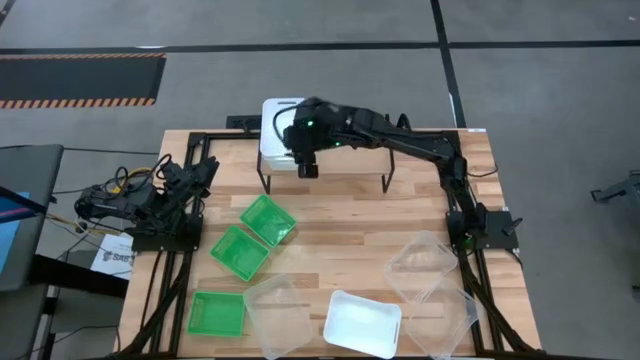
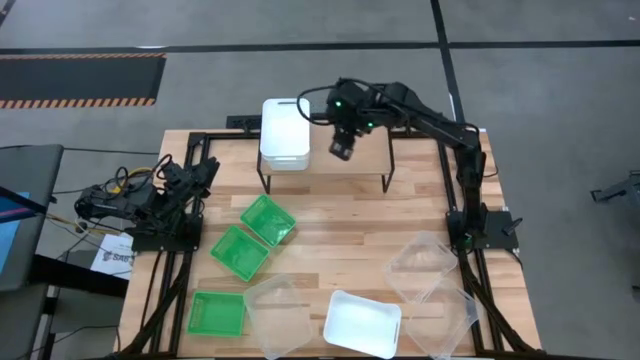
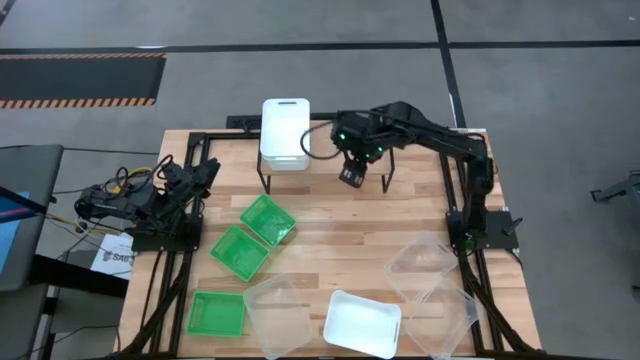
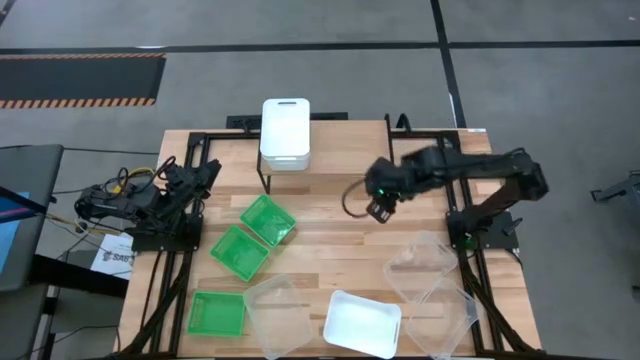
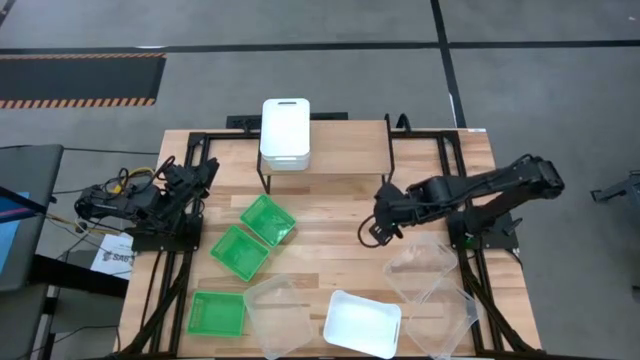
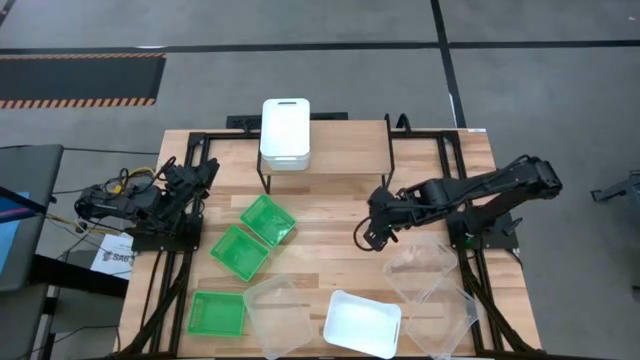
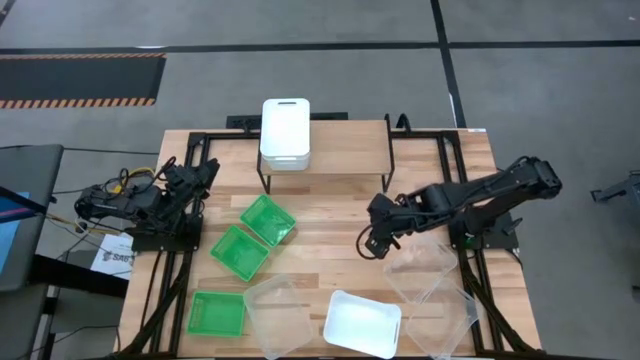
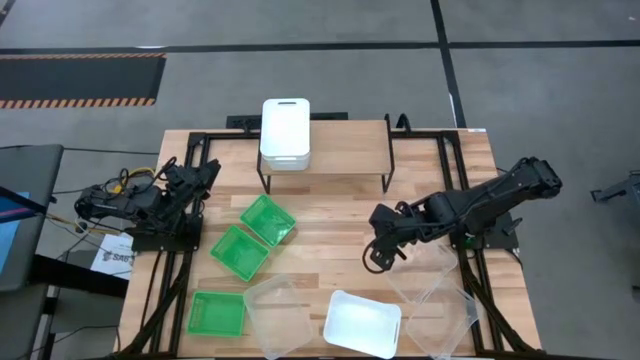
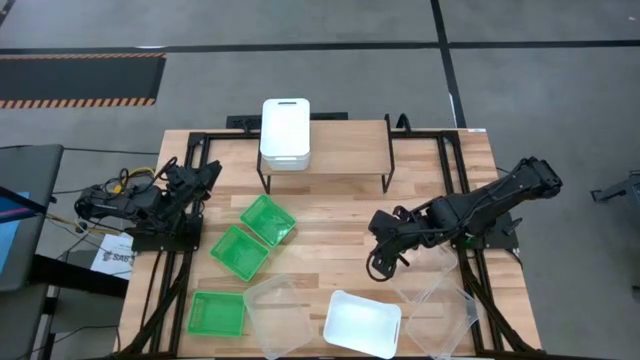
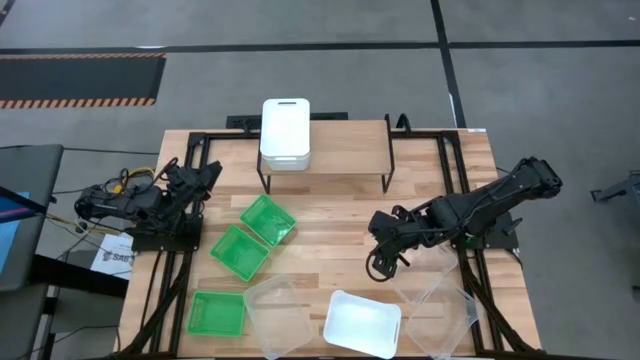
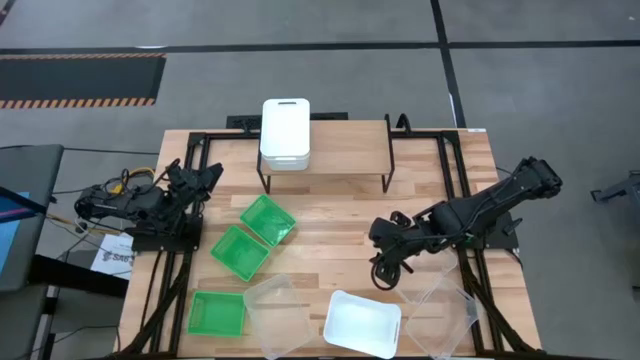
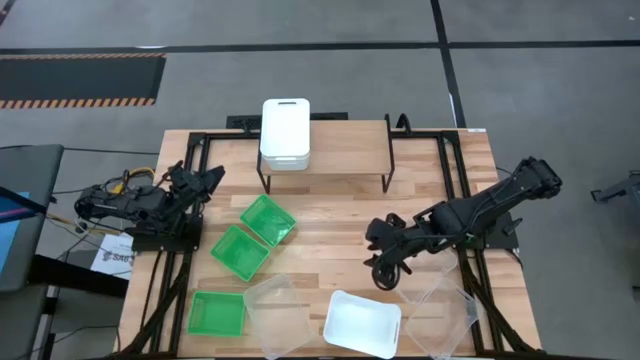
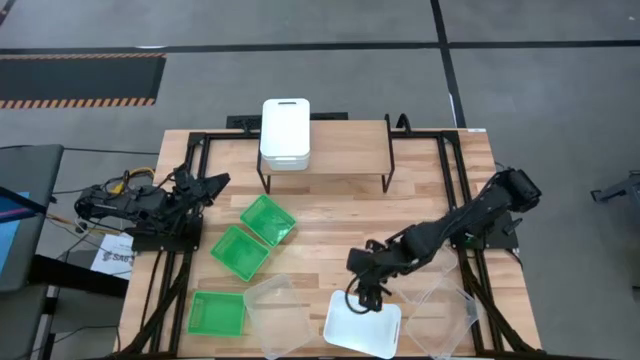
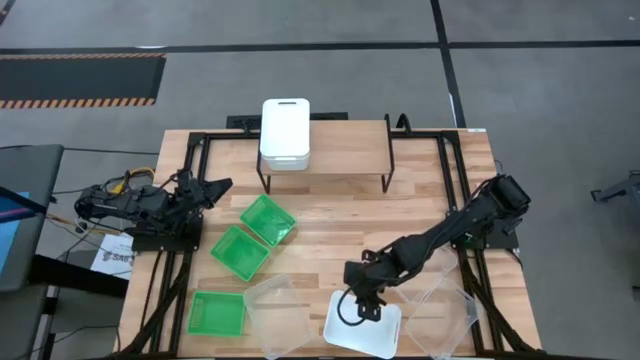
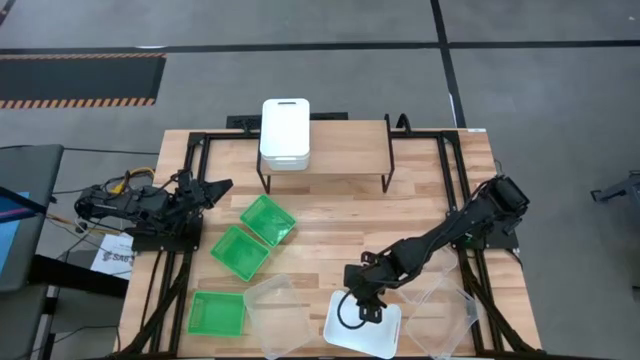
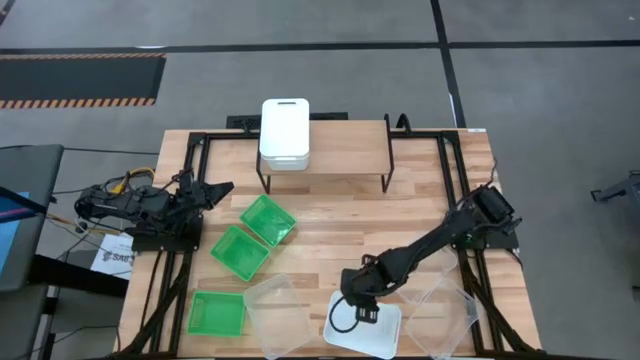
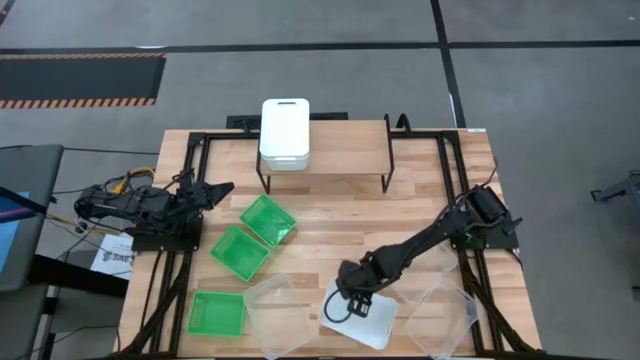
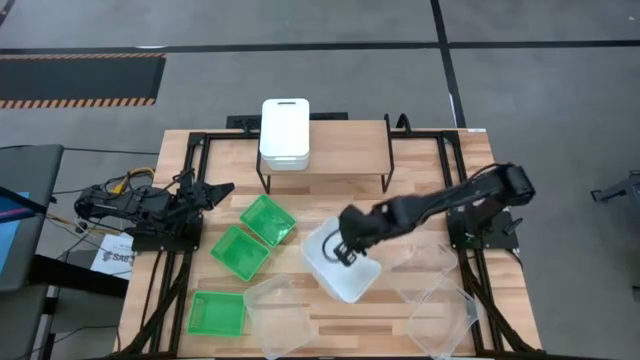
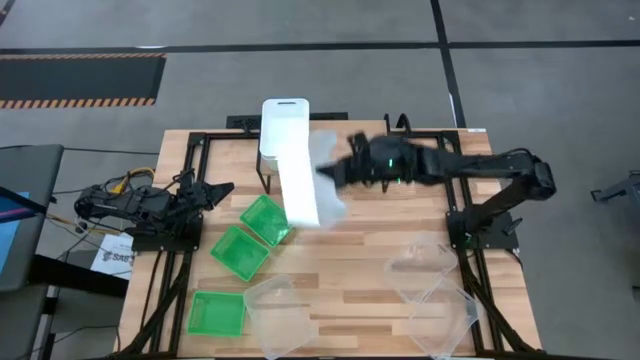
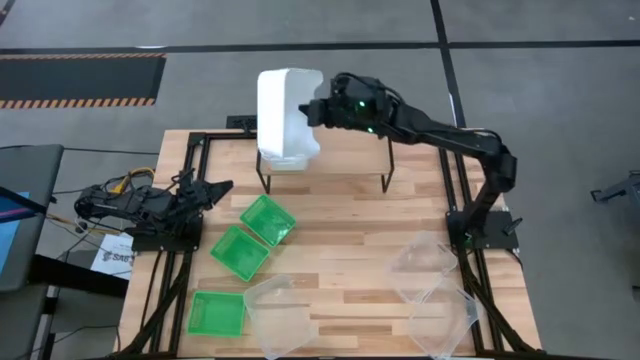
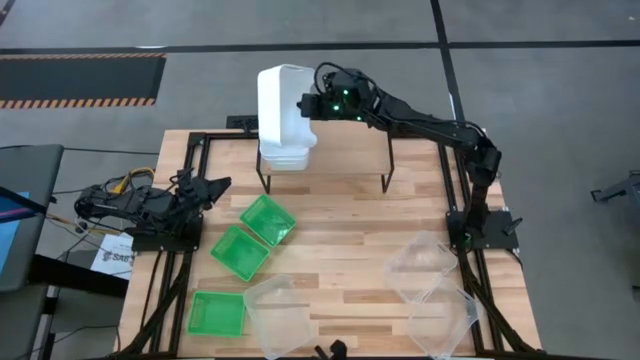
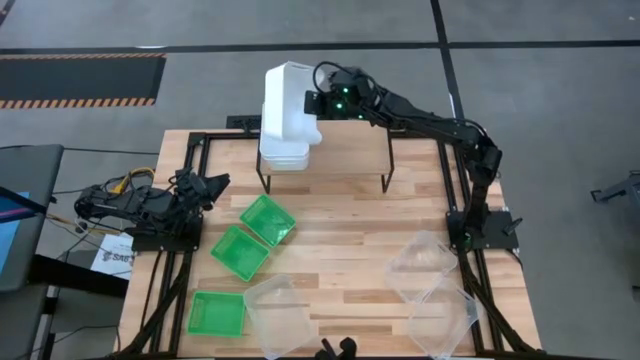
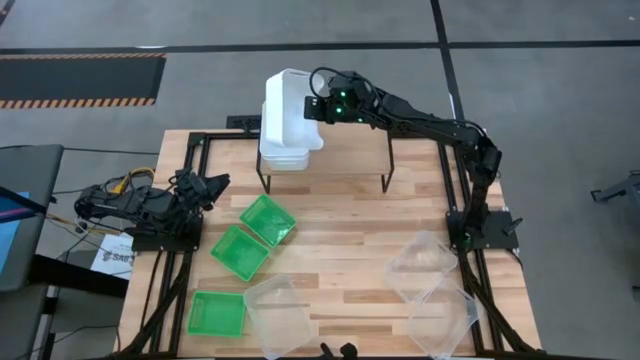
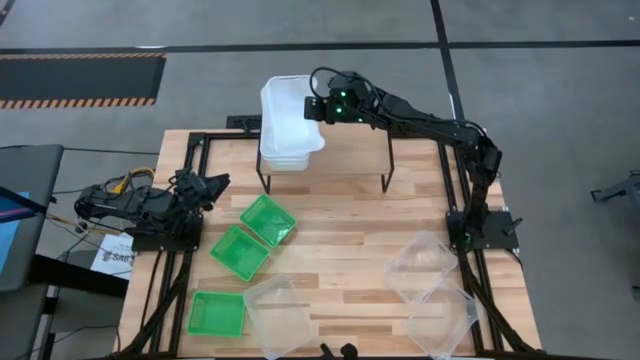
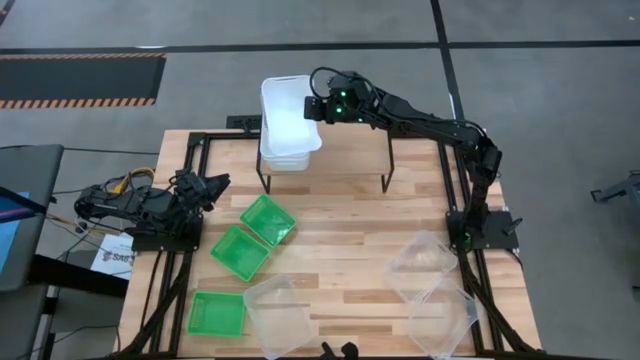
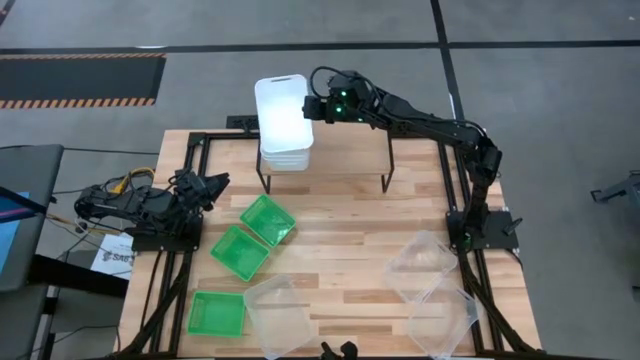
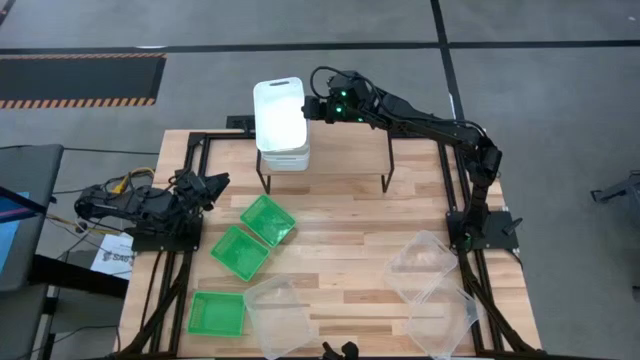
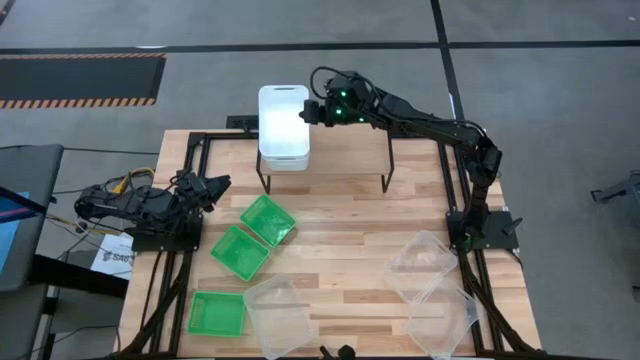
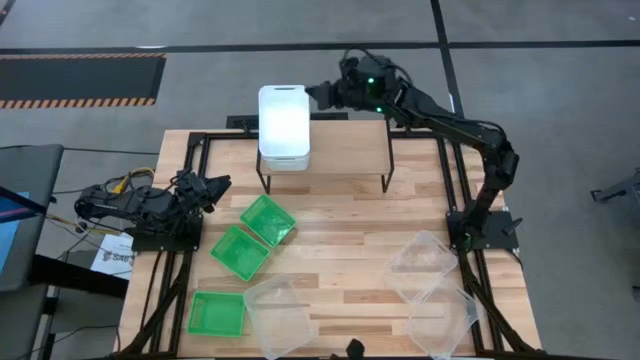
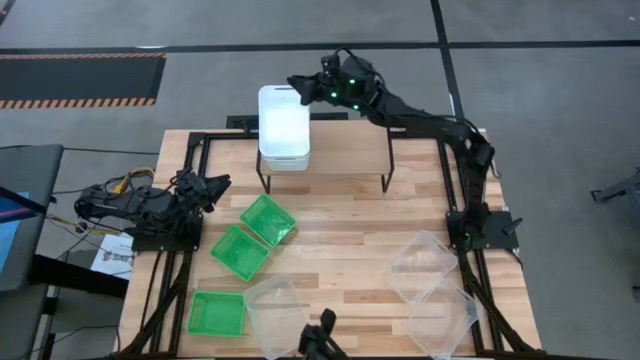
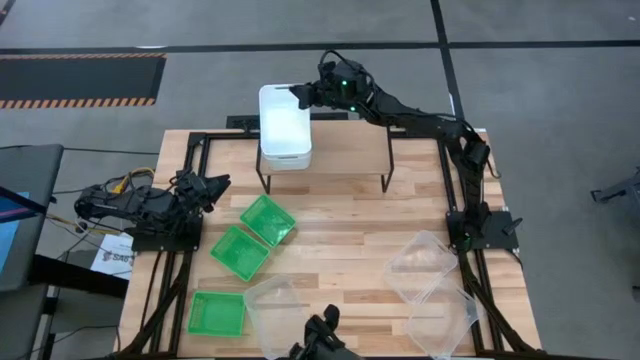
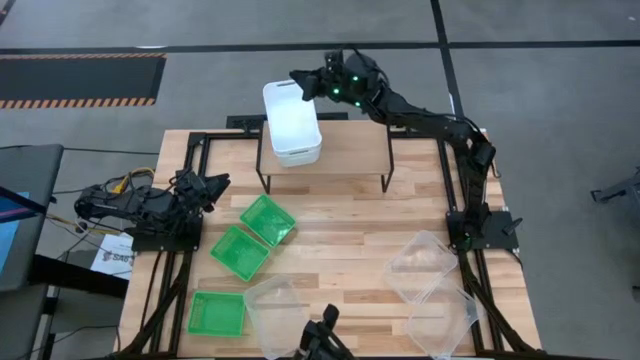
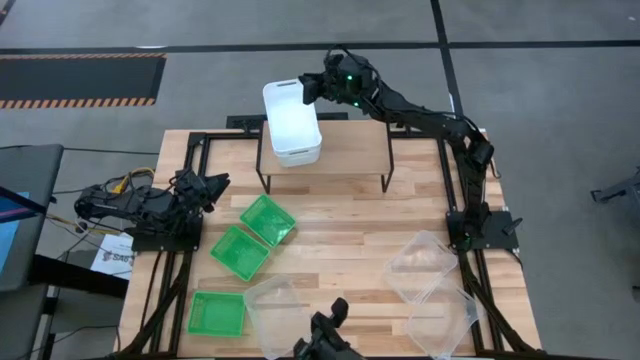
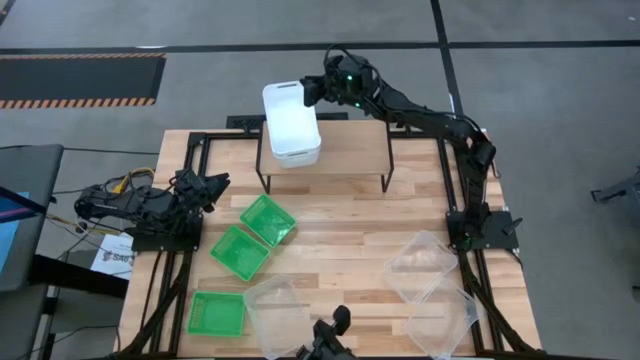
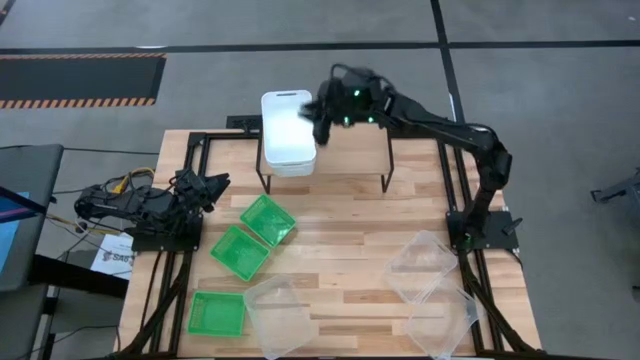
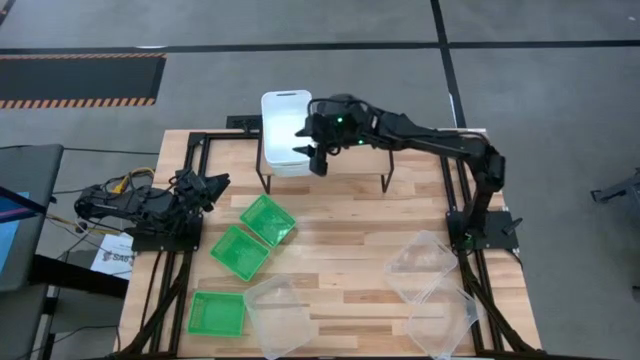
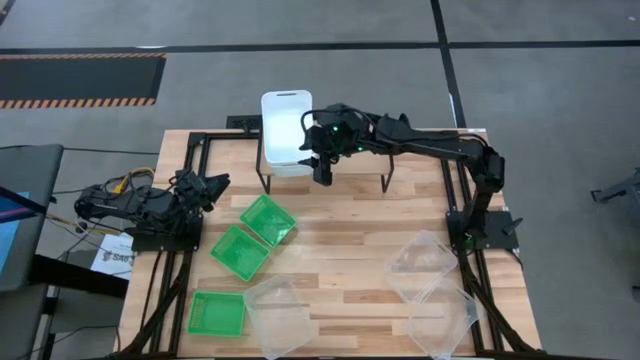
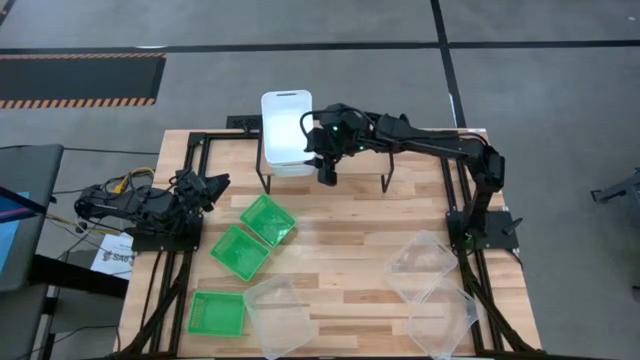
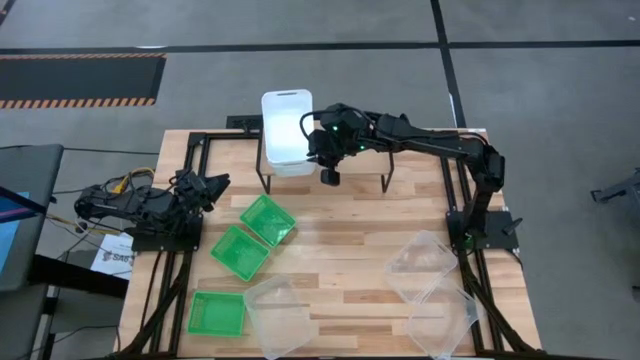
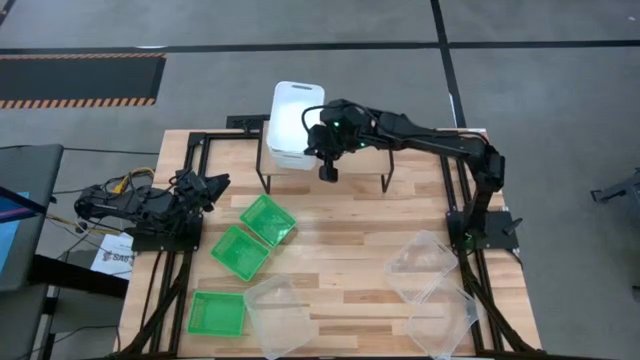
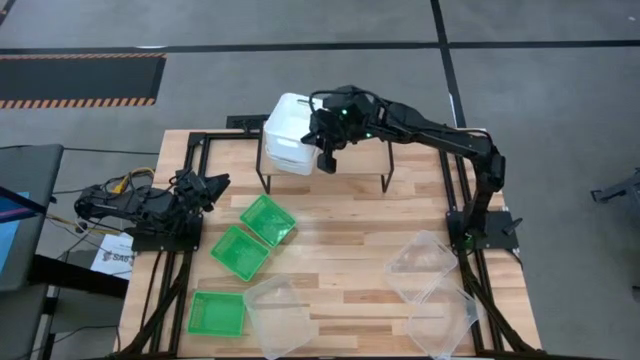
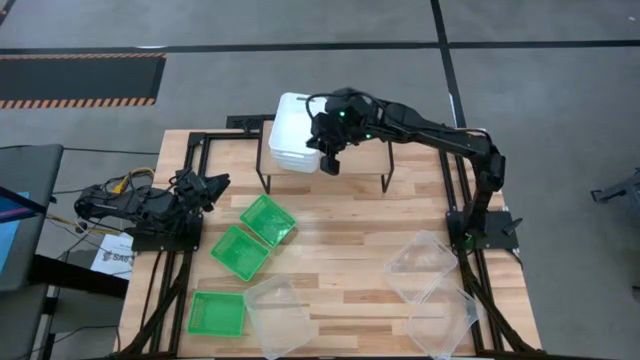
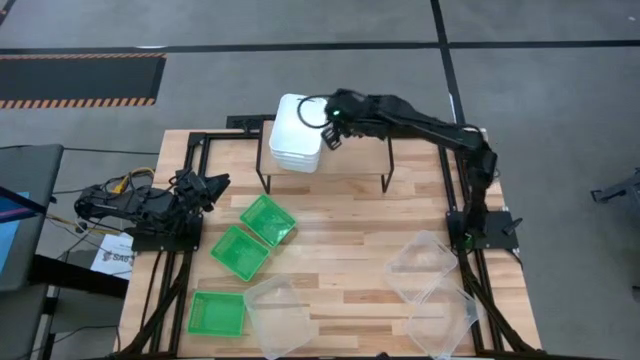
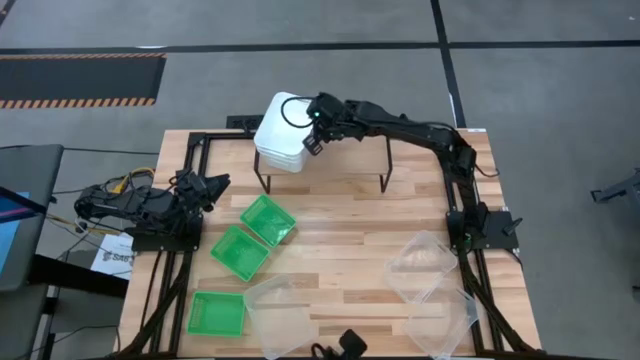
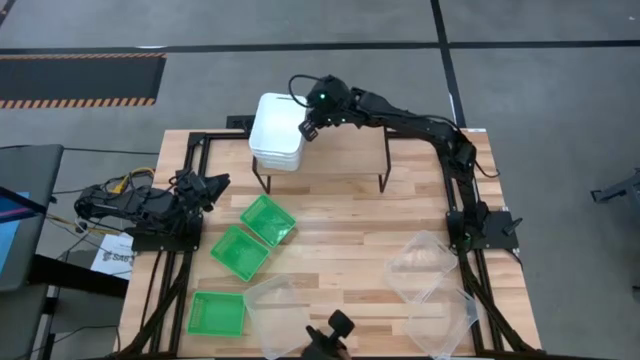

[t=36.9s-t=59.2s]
Task: Stack baskets on shelf by color
Stack the white bin on the white bin on the shelf
